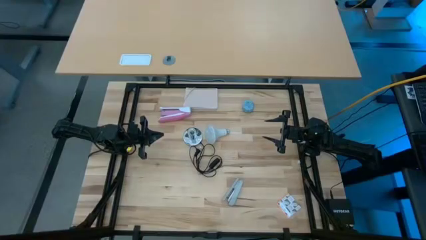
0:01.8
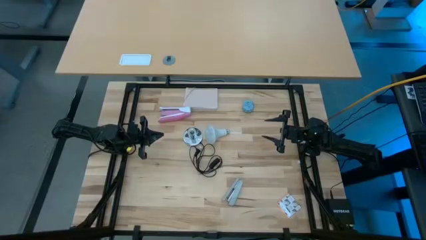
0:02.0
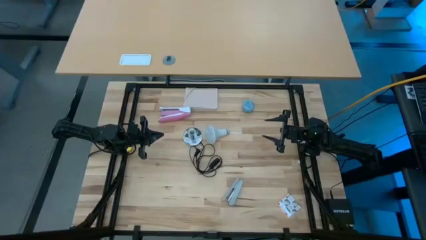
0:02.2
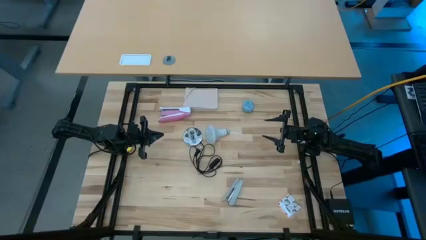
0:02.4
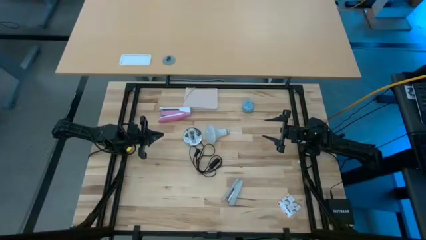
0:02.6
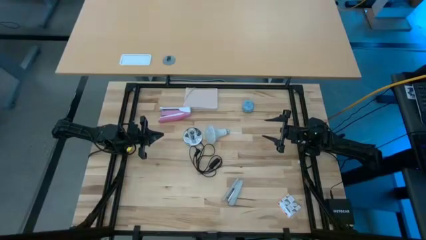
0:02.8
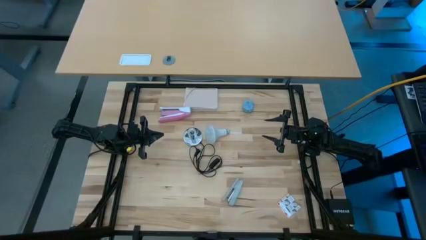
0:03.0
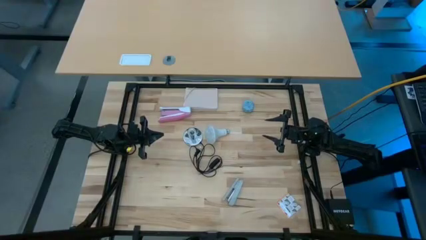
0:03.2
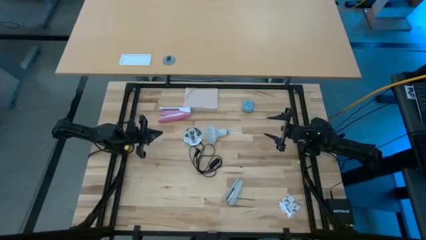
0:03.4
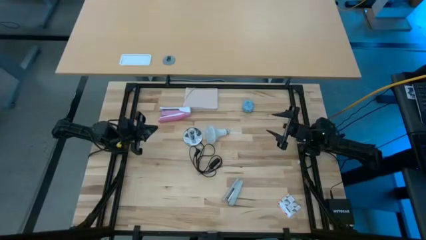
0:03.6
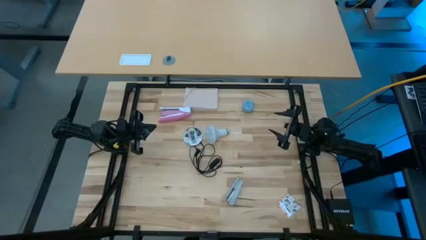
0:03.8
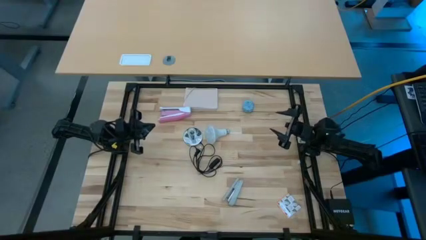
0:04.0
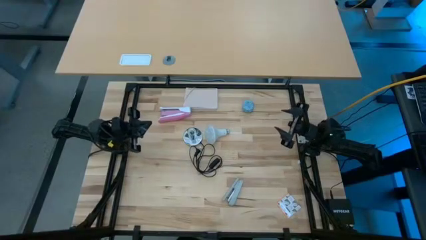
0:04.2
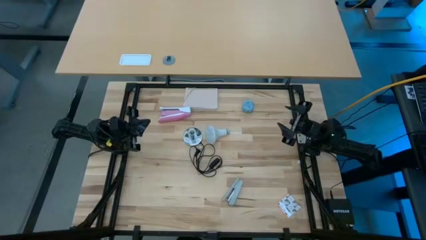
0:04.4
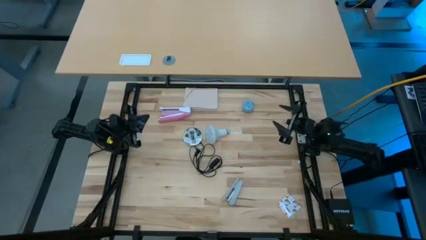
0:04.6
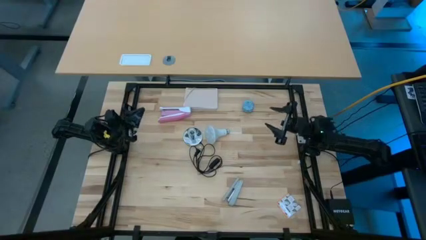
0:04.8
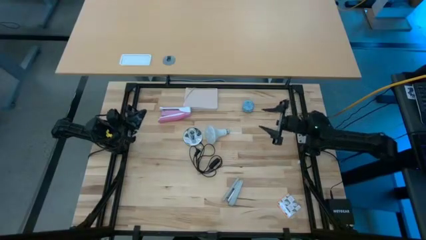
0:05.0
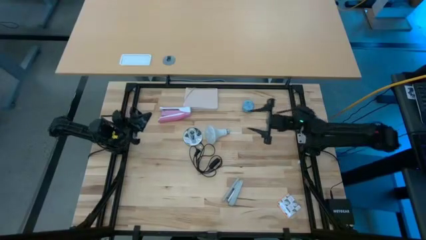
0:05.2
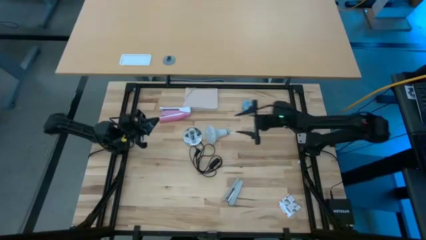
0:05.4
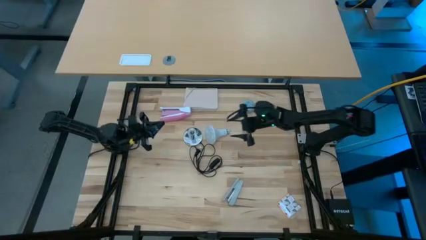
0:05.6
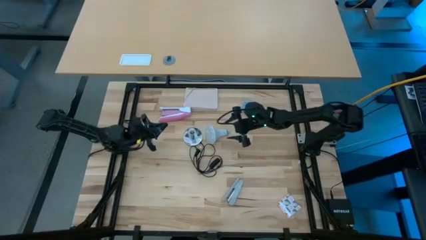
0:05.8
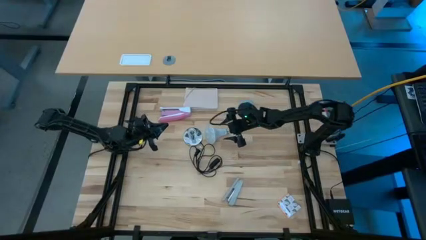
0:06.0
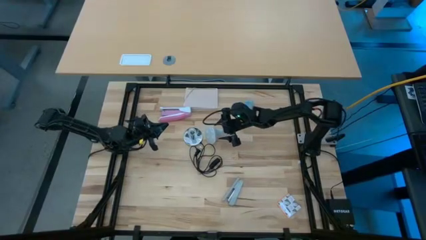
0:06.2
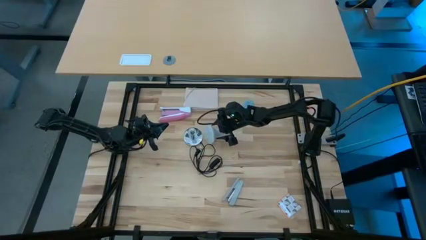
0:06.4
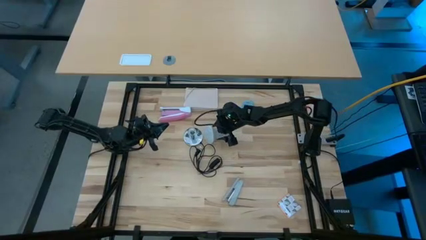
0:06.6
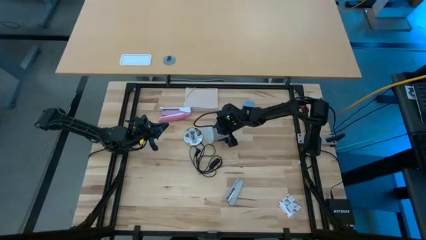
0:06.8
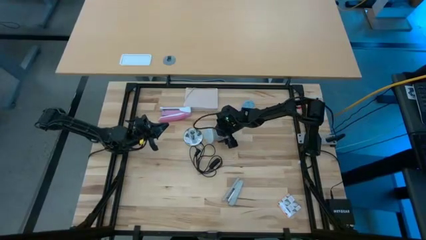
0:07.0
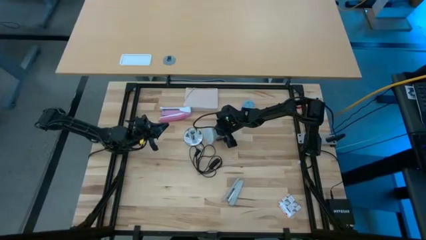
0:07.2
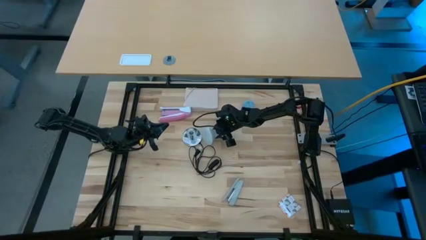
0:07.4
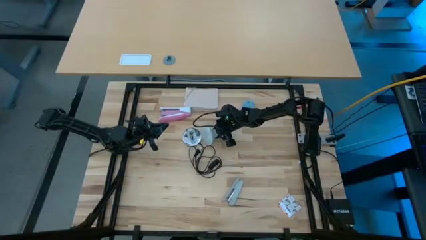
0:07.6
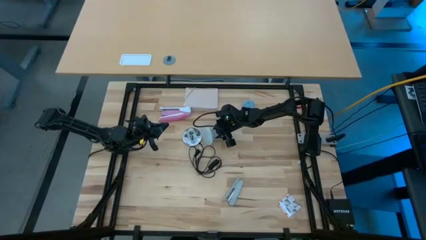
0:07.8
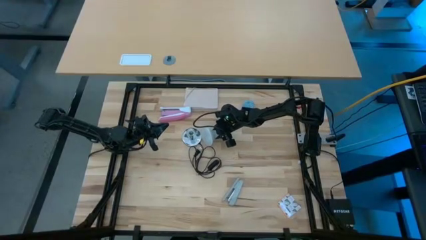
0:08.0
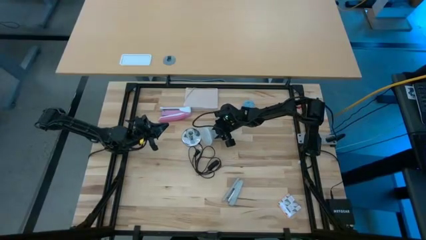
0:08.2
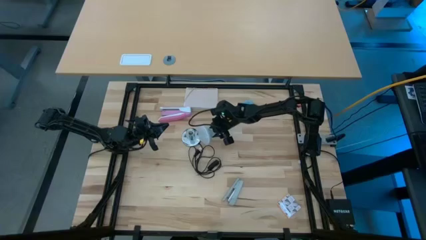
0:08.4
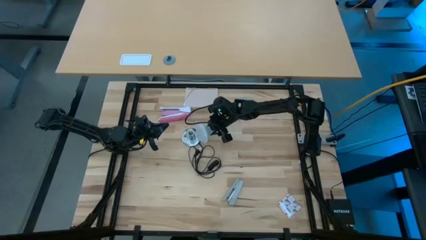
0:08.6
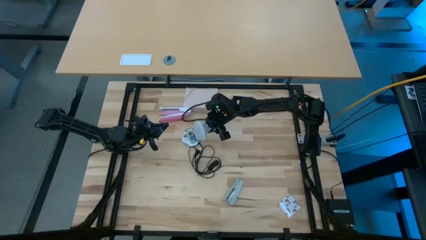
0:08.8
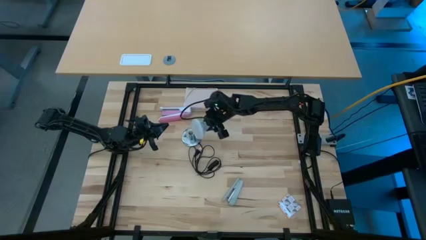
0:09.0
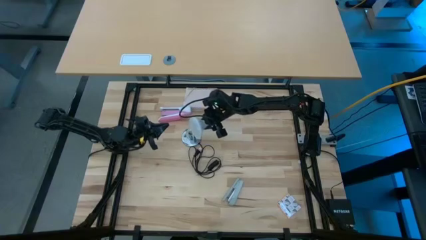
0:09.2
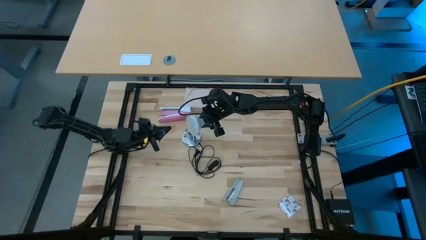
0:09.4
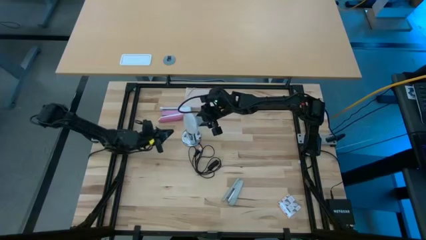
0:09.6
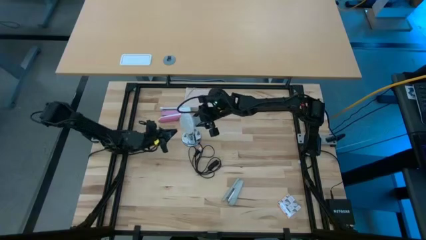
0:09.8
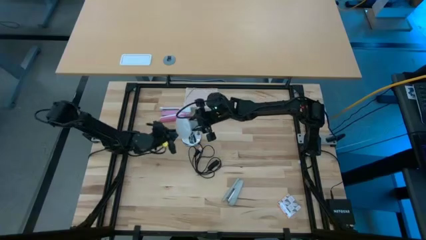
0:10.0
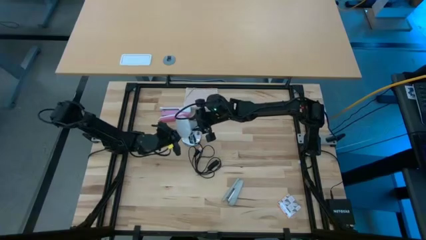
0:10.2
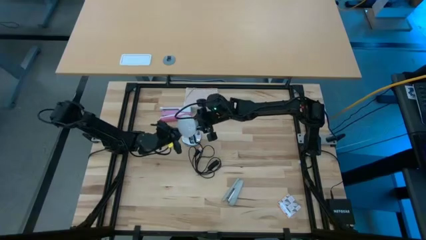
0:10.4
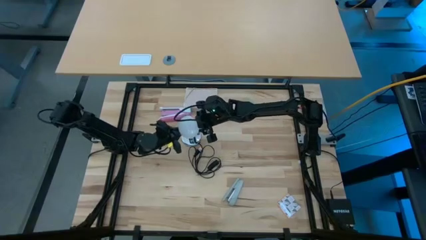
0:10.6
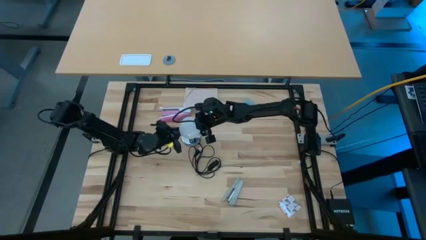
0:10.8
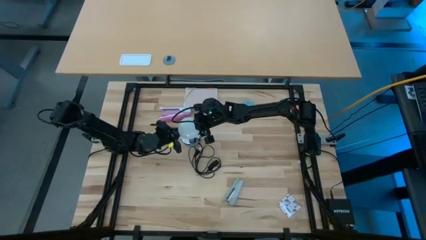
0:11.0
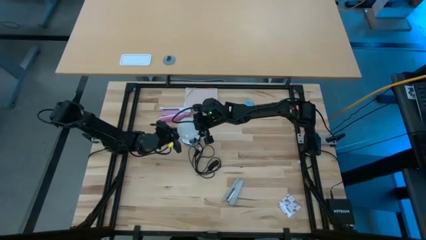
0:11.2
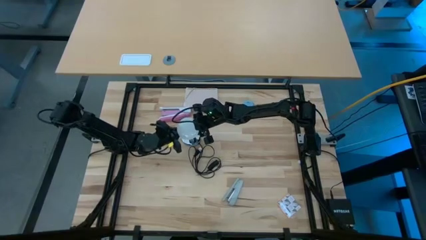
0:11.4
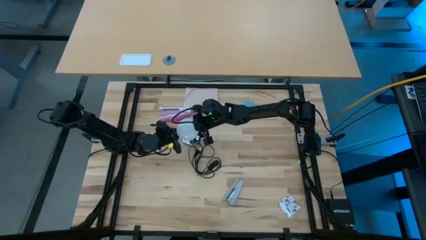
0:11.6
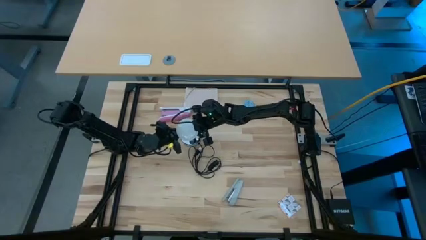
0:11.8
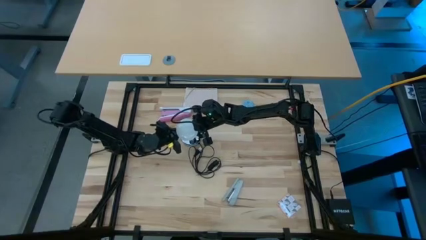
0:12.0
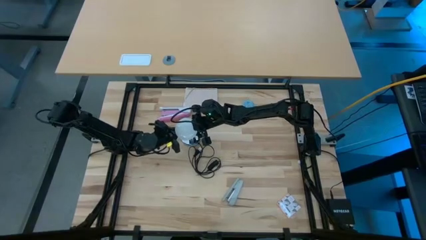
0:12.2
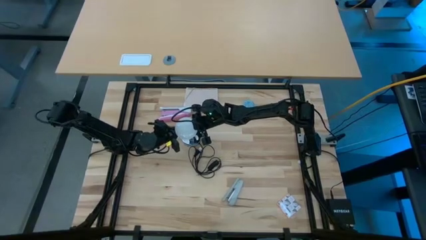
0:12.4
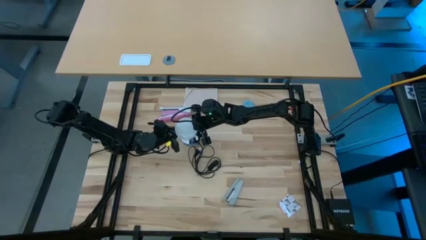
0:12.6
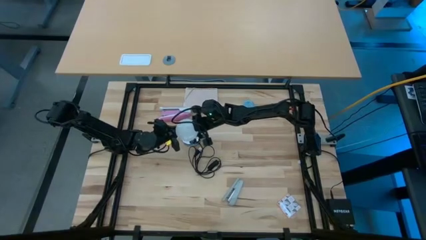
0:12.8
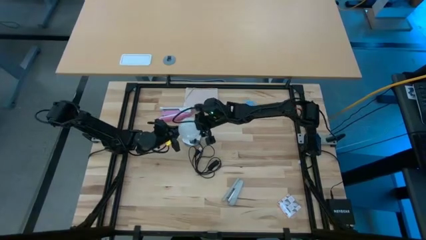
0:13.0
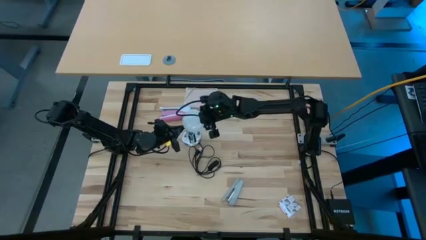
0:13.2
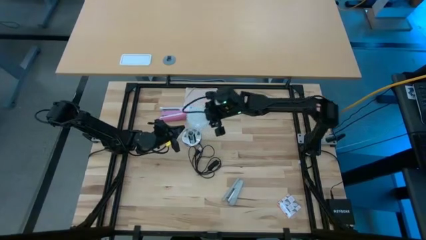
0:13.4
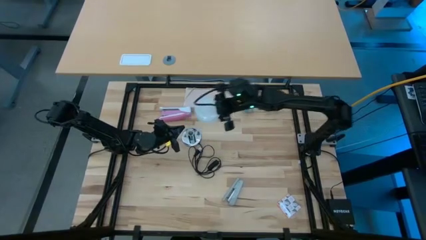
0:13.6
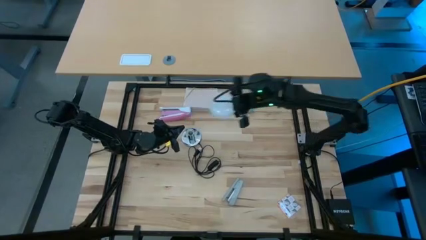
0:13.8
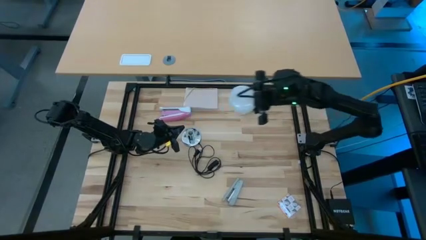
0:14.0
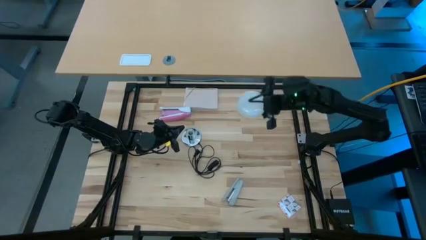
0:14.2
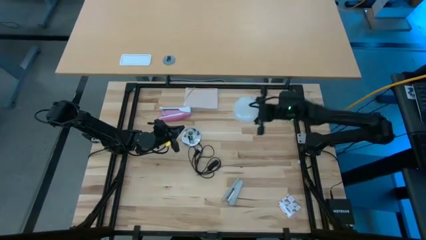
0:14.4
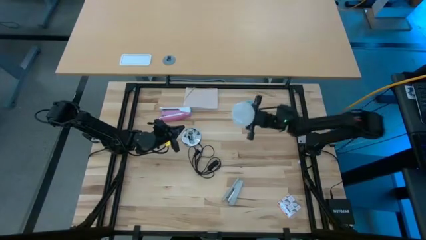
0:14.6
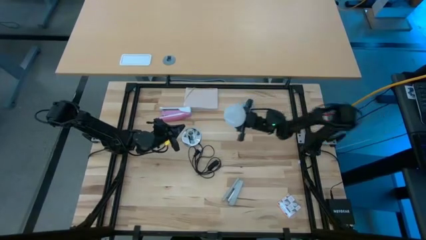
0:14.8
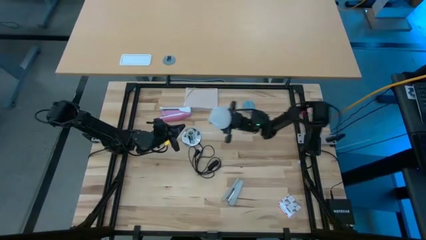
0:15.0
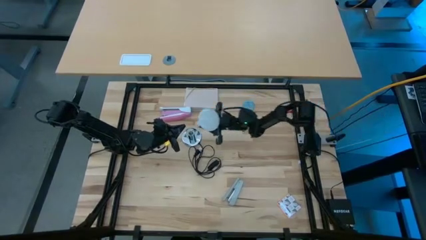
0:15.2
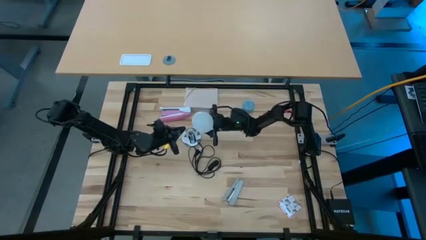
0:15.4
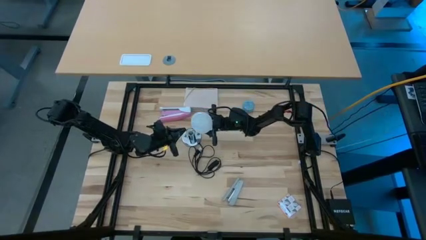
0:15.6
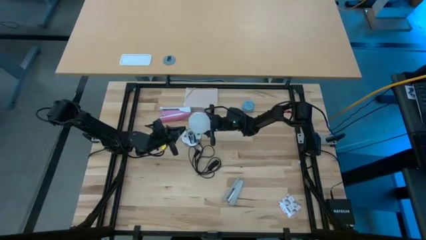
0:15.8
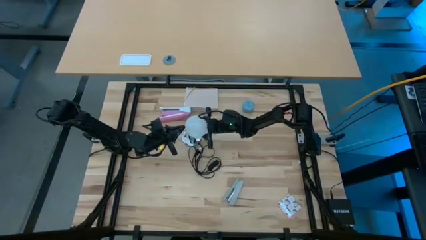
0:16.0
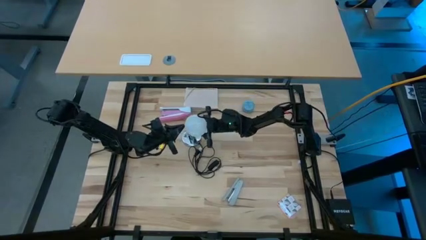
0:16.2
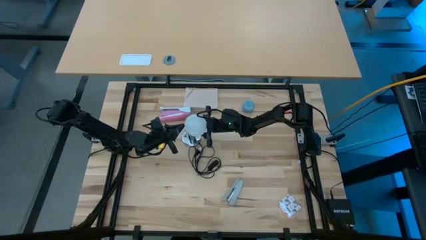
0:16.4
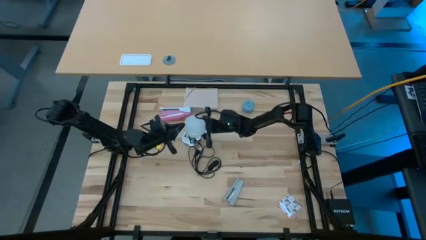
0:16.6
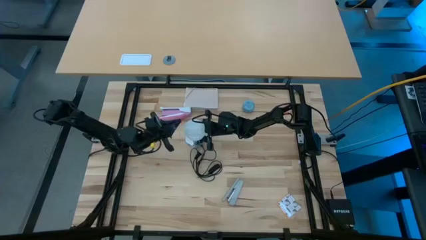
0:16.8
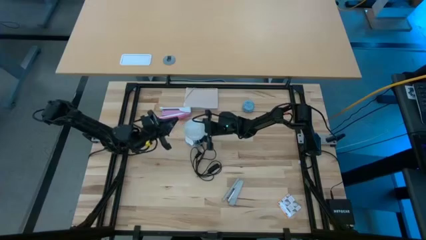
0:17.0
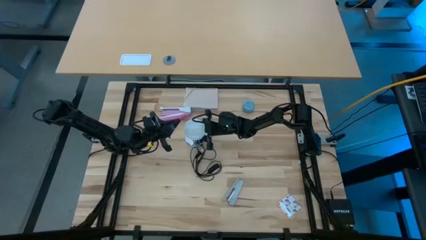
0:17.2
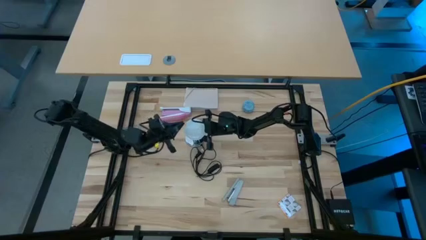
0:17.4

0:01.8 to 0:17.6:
Task: Screw lightbulb
Insert light bulb into the lamp
